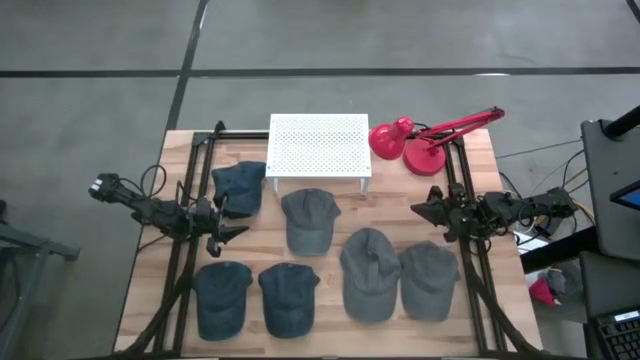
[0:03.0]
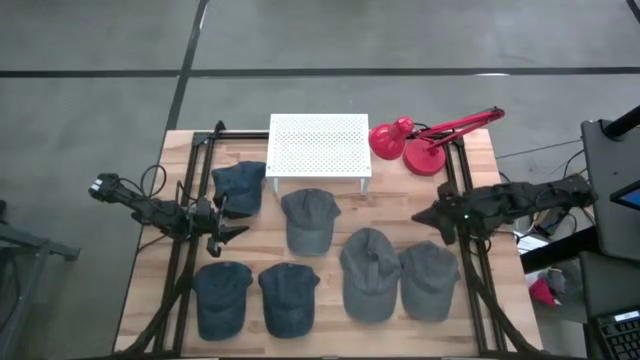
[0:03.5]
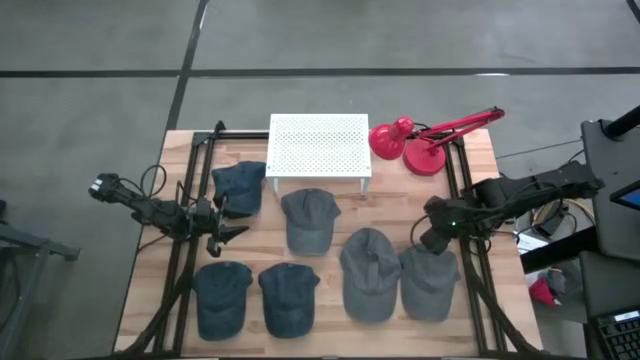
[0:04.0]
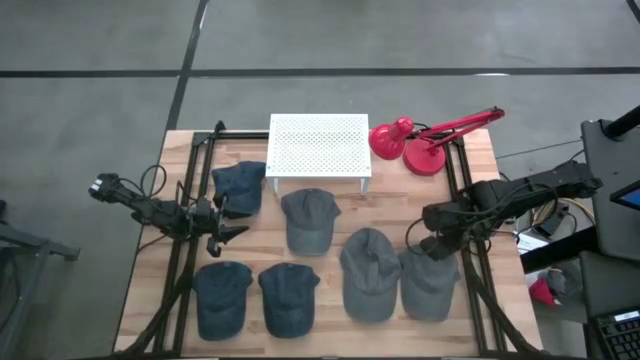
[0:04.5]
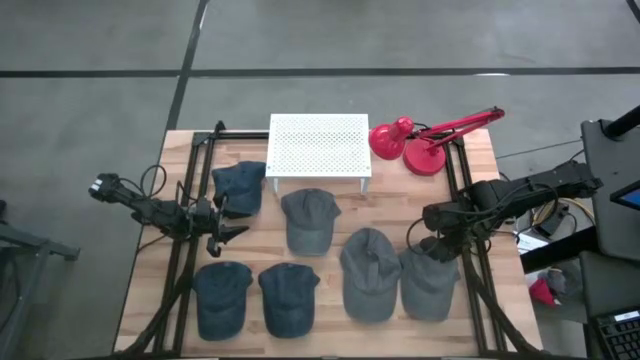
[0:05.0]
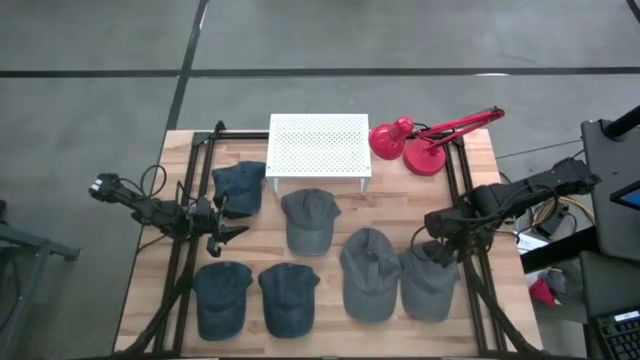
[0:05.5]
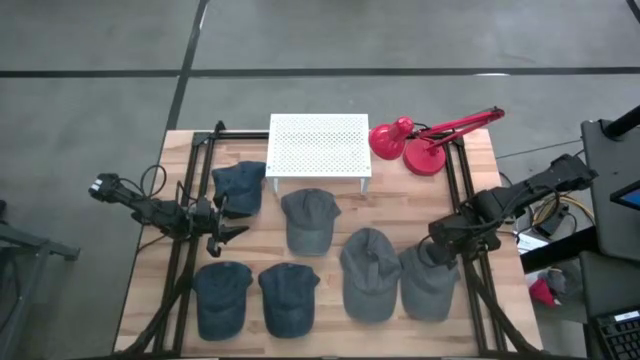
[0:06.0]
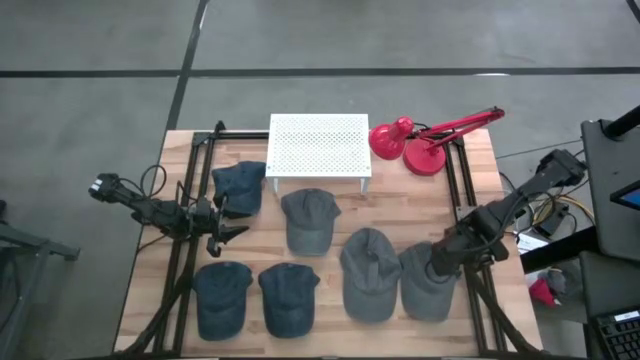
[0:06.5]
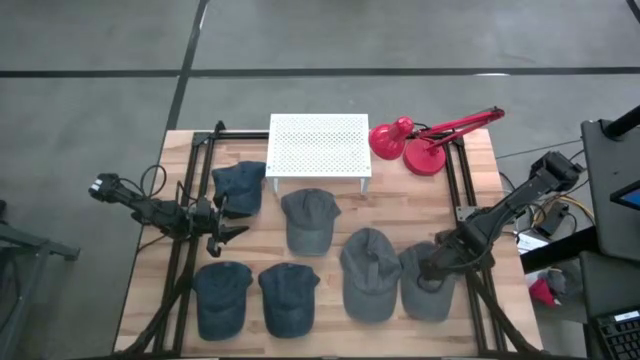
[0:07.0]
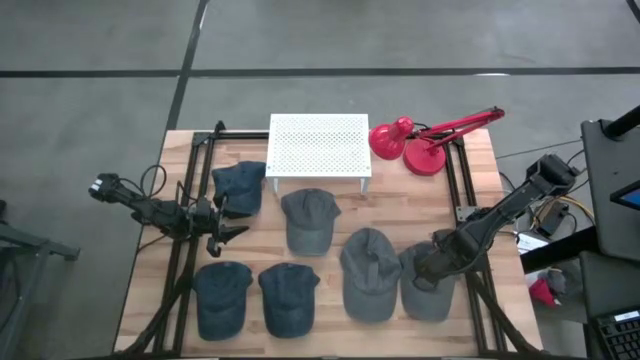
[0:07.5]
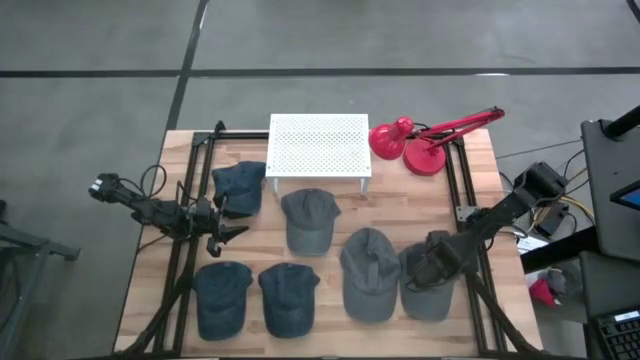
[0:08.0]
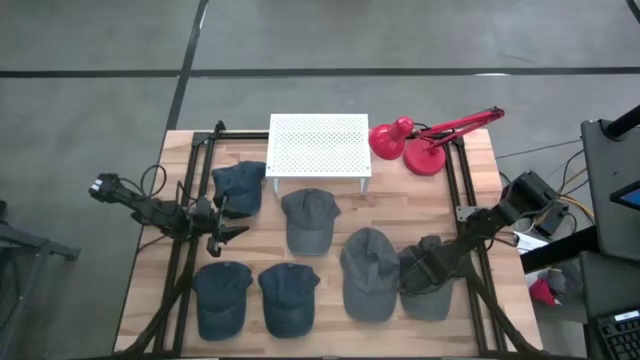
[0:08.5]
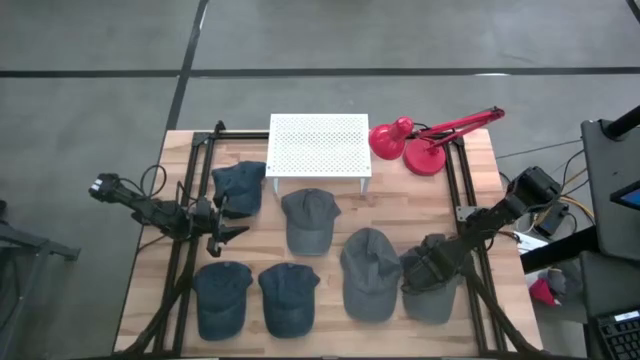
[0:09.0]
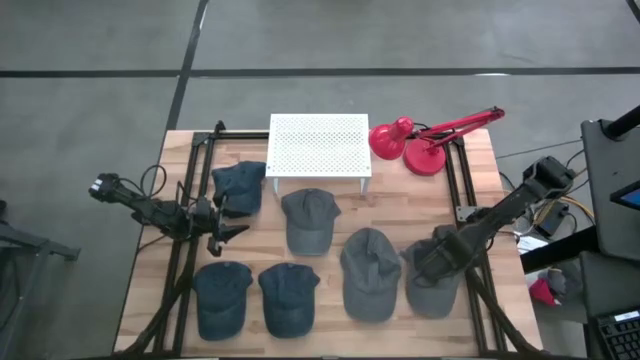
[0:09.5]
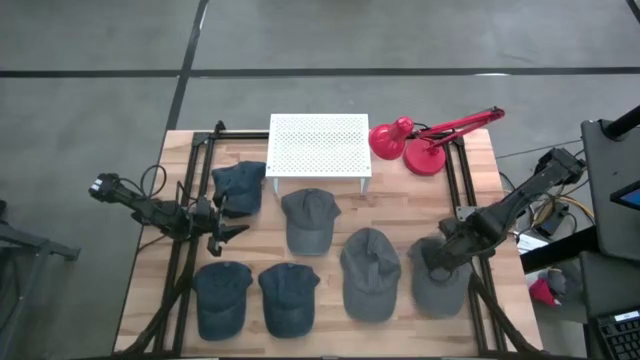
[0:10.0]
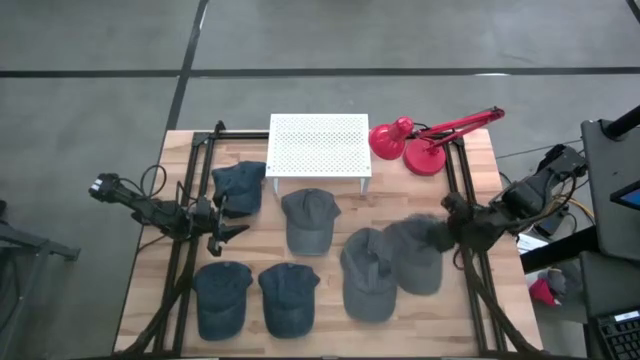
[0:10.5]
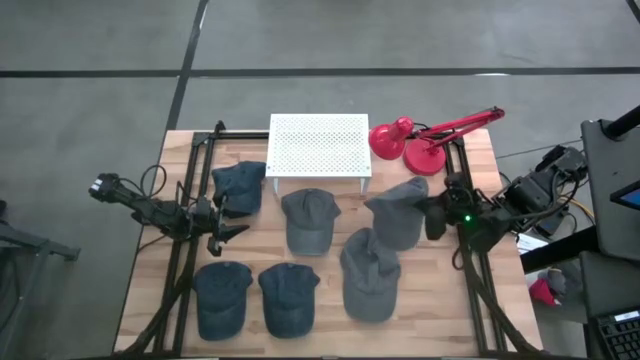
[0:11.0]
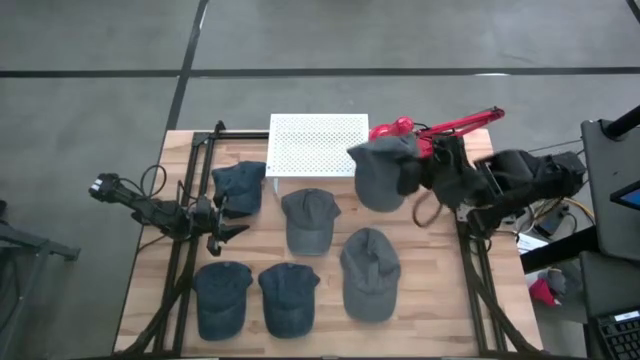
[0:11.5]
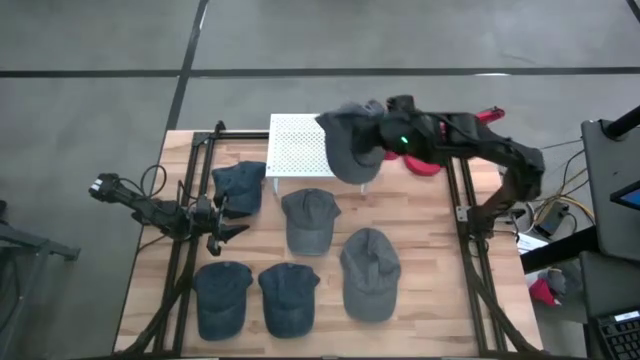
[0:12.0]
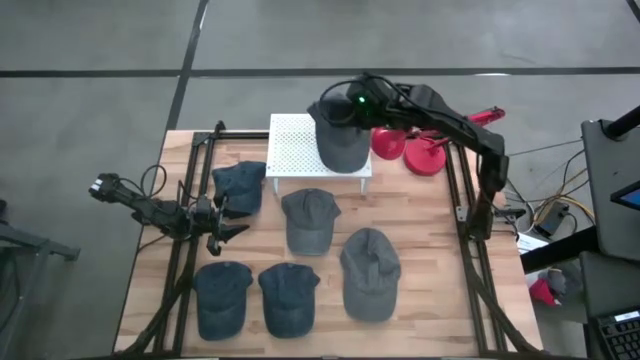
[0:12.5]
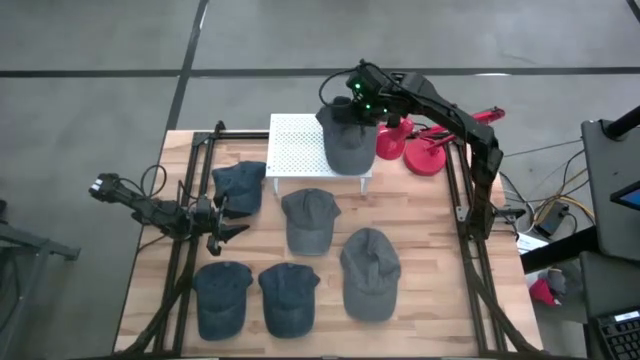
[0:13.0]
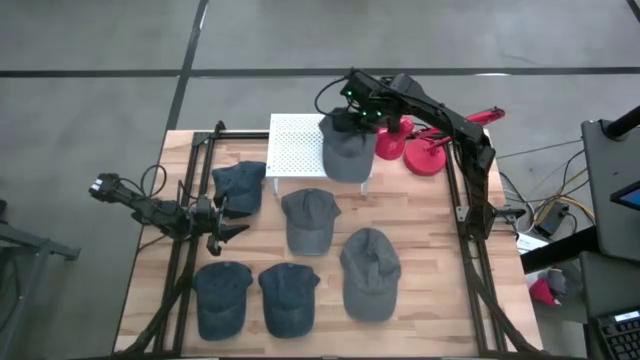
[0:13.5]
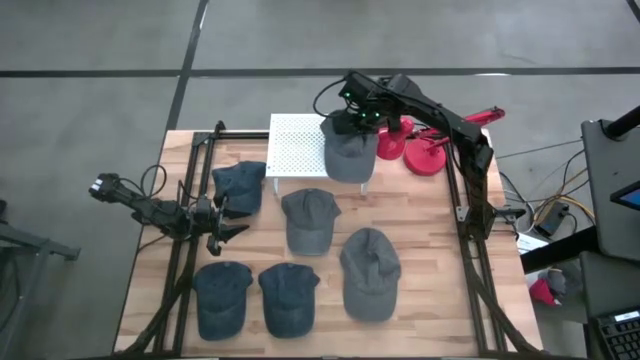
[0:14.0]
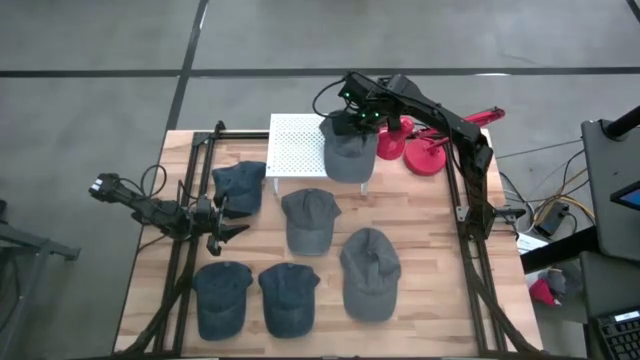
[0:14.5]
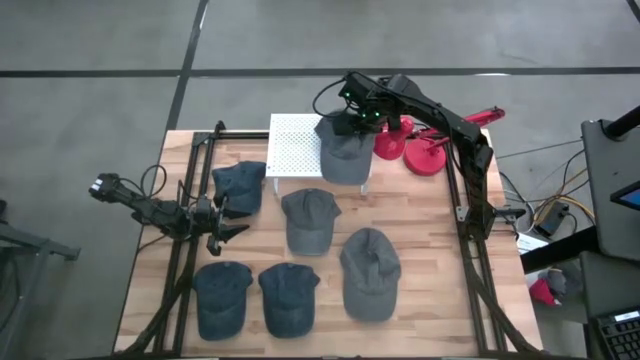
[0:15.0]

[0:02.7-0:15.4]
Task: Pick & Place hat
Put the bottom right gray cap on the shelf

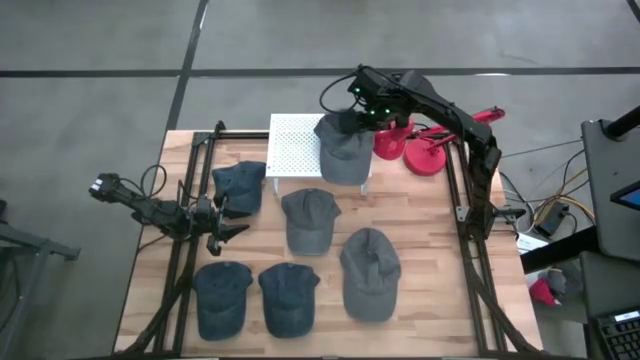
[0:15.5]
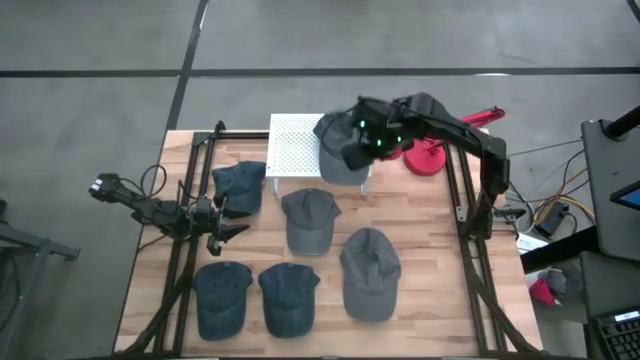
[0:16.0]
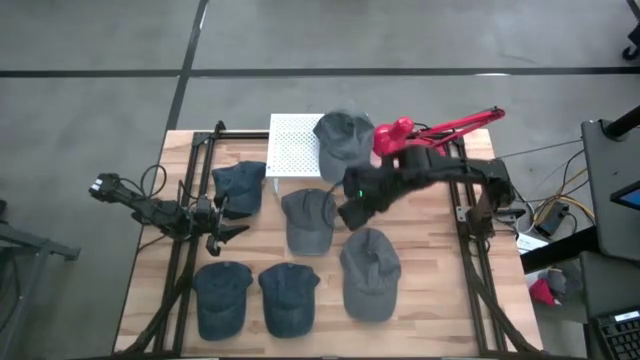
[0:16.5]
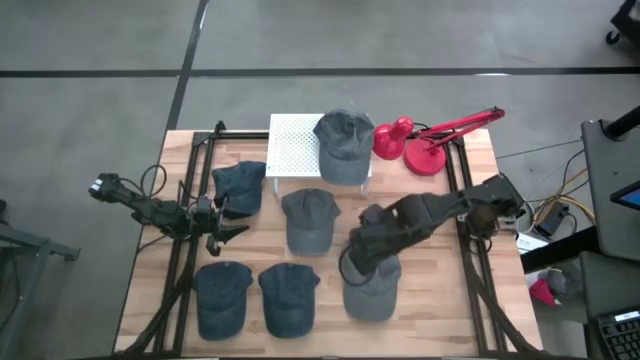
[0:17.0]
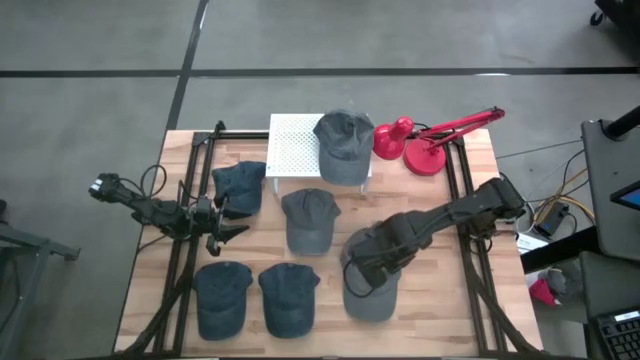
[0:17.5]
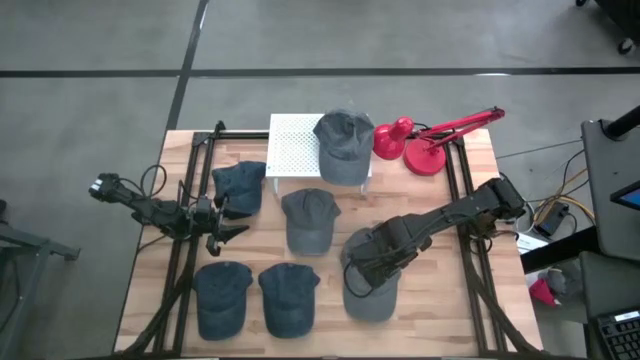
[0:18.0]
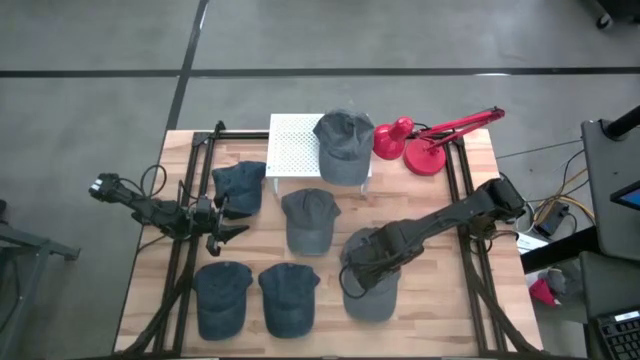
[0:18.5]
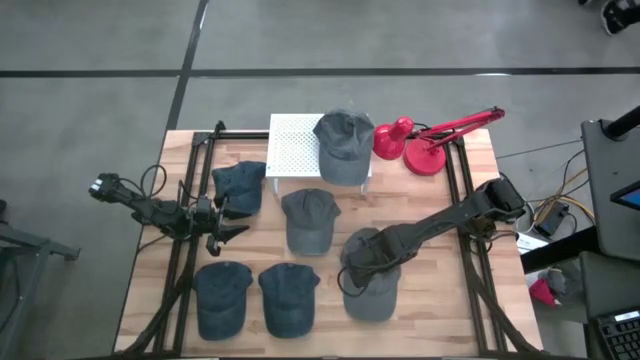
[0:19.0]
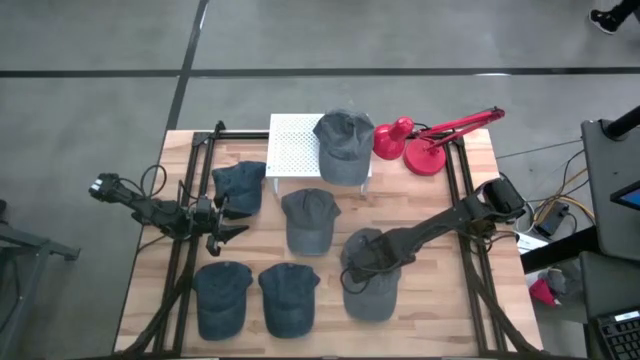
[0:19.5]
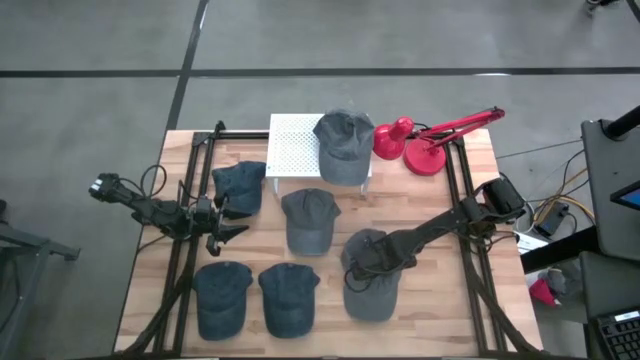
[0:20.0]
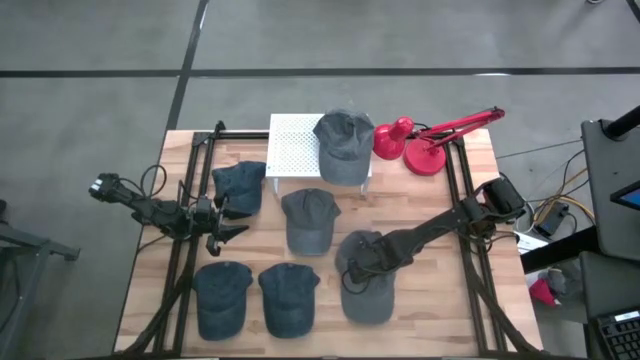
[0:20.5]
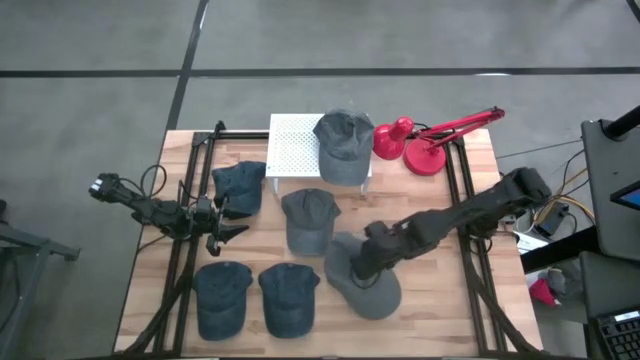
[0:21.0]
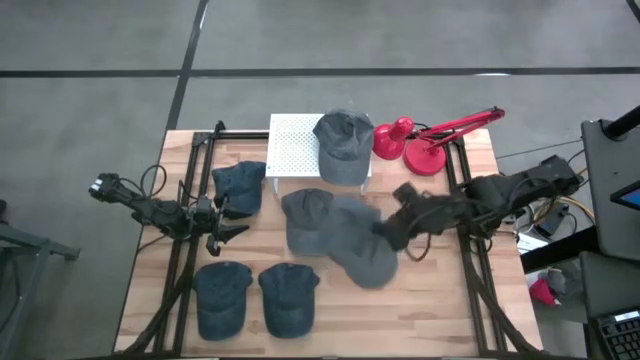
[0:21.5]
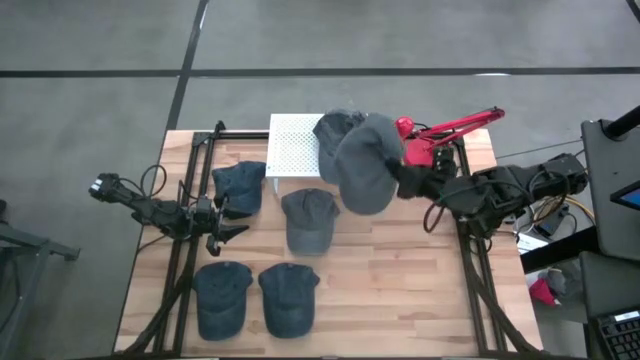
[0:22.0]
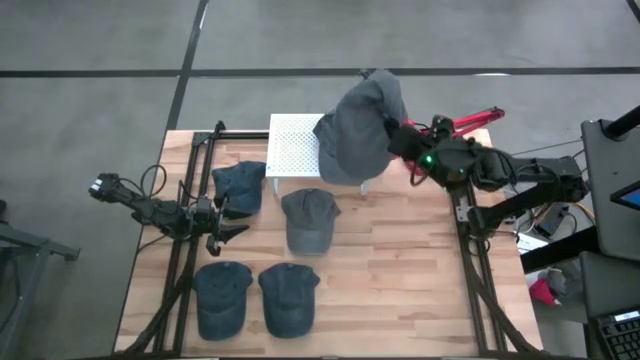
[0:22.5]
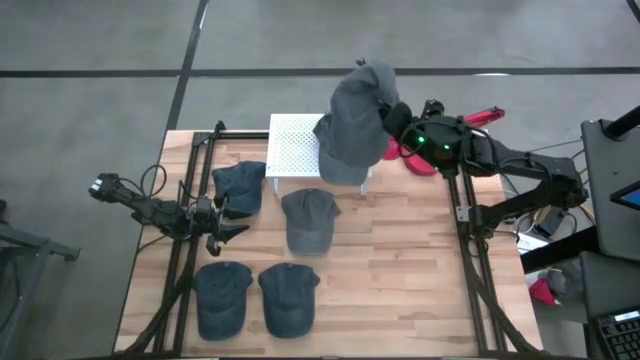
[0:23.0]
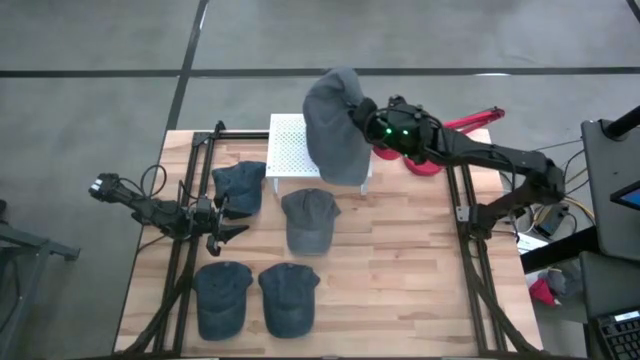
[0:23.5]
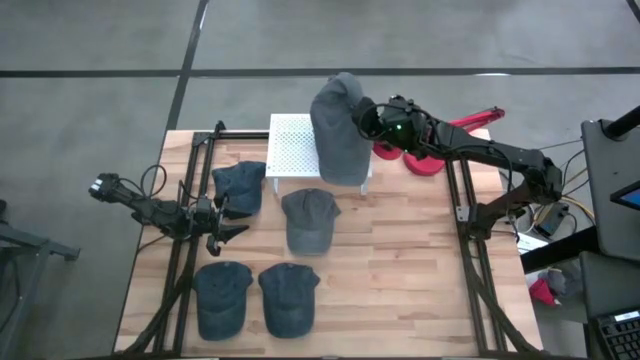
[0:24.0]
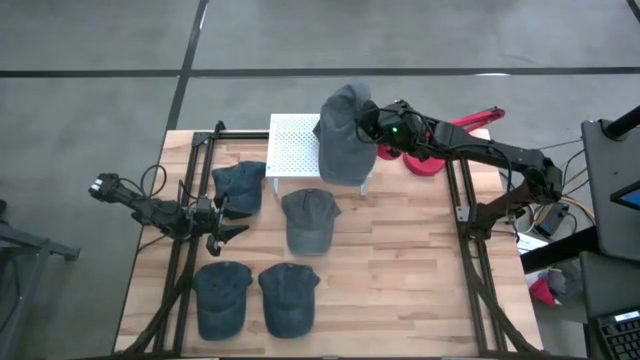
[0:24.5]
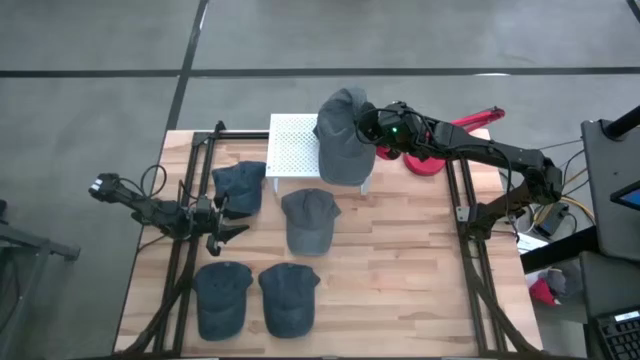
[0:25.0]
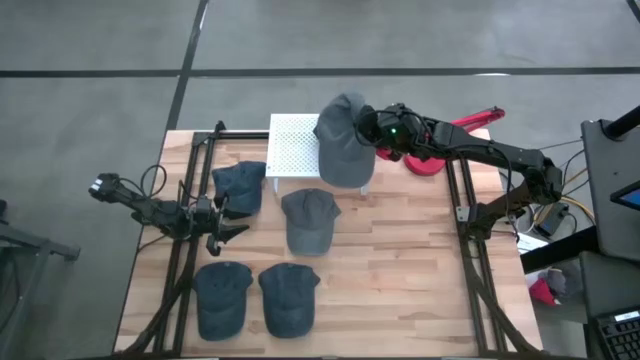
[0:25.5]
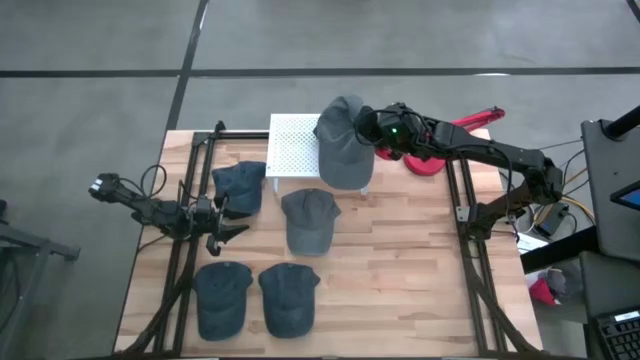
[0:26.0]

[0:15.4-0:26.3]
Stack the bottom gray cap on top of the other gray cap on the shelf
